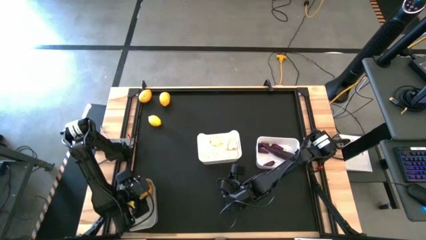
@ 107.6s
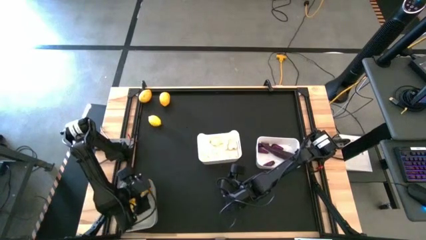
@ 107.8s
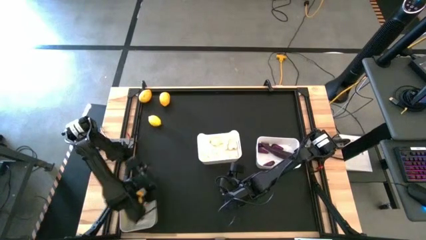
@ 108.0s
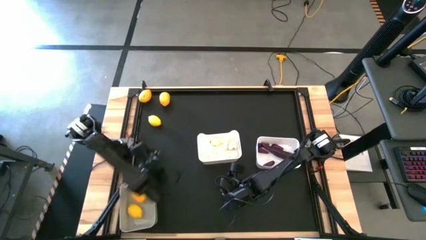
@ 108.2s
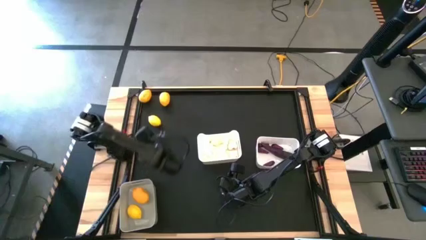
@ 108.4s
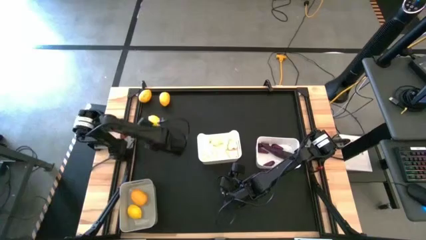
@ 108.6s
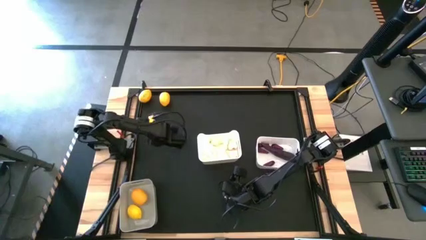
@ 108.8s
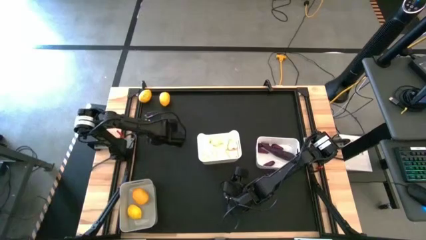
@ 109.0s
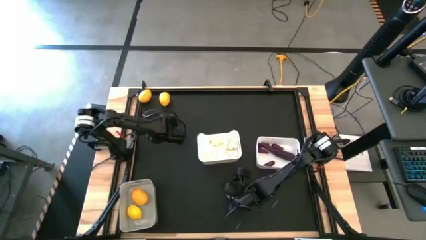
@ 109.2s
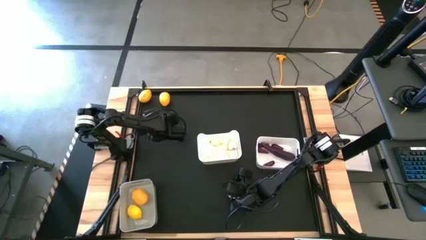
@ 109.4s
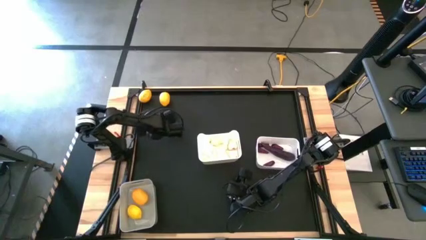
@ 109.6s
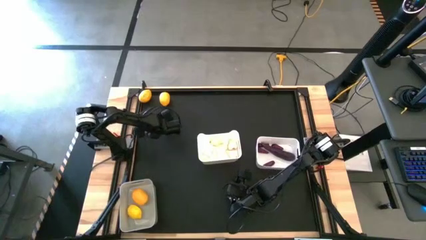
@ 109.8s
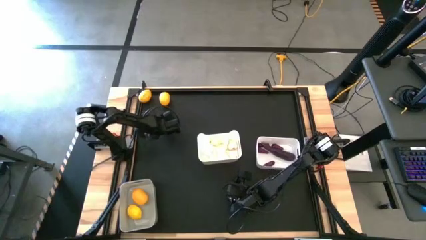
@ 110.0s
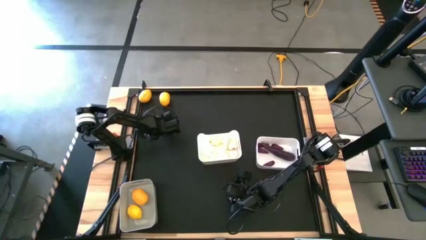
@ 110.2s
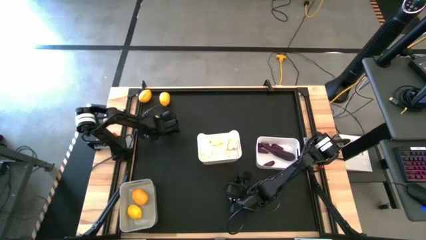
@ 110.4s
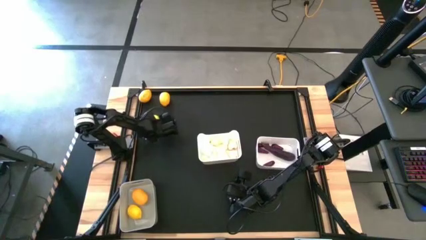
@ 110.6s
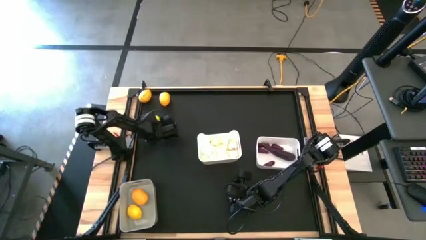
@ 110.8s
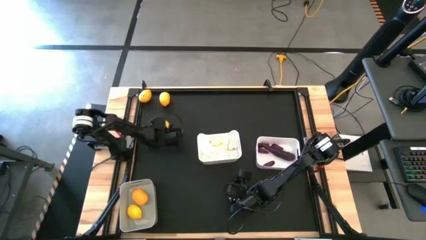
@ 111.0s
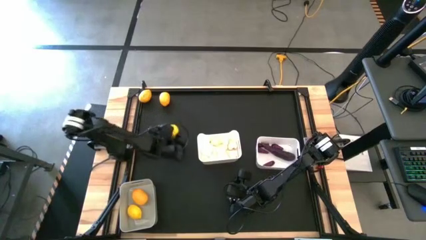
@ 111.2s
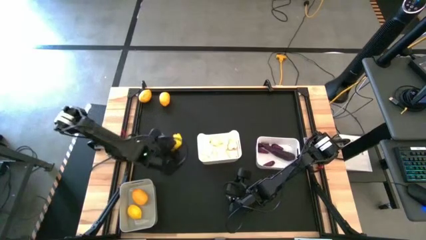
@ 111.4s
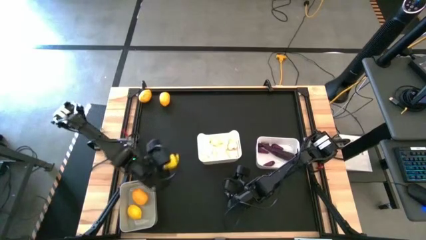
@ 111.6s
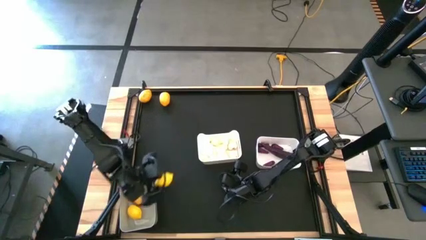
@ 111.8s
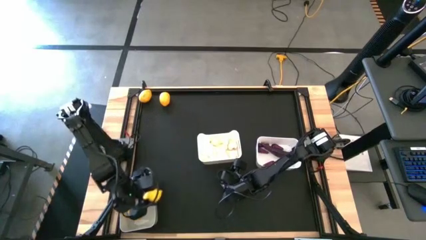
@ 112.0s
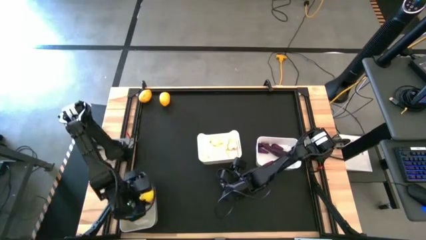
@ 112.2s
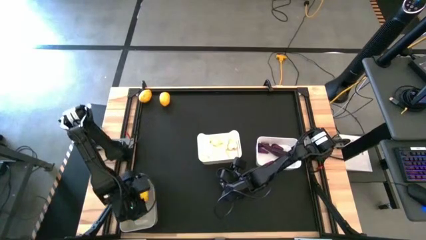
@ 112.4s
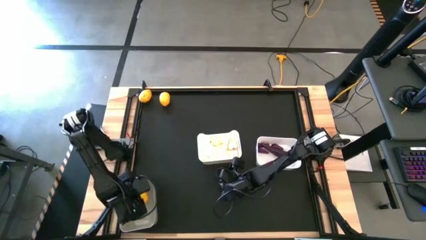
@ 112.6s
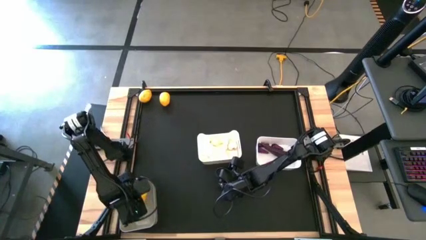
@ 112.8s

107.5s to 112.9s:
Task: Sort produce into baskets
Put the lemon into the gray bin

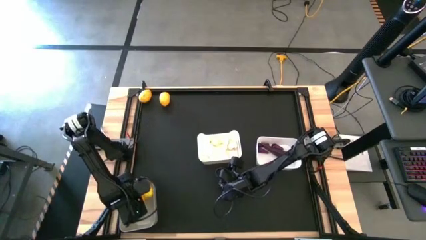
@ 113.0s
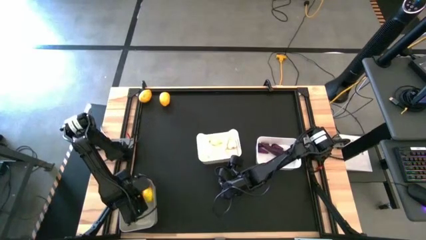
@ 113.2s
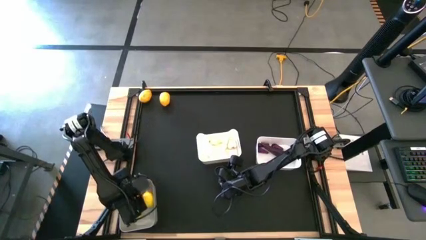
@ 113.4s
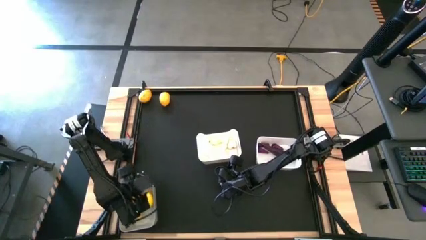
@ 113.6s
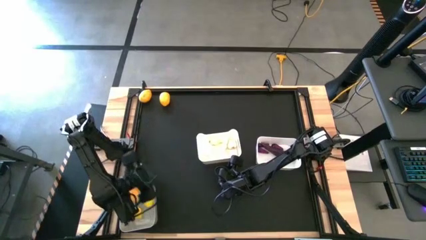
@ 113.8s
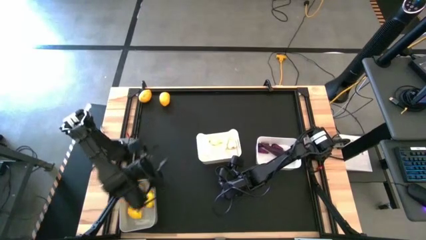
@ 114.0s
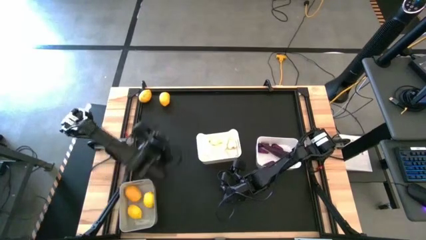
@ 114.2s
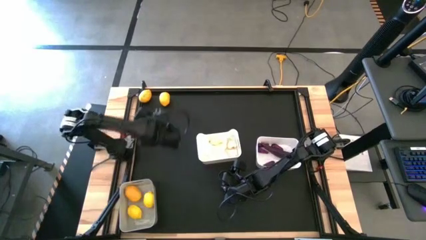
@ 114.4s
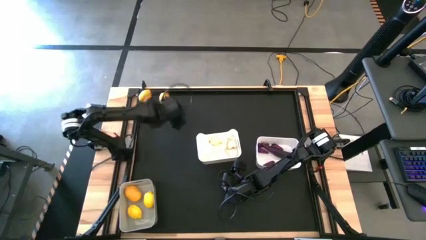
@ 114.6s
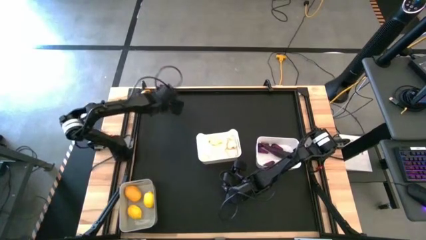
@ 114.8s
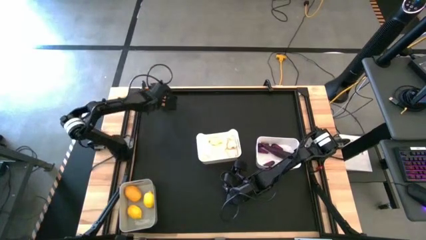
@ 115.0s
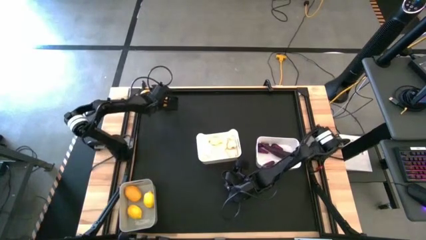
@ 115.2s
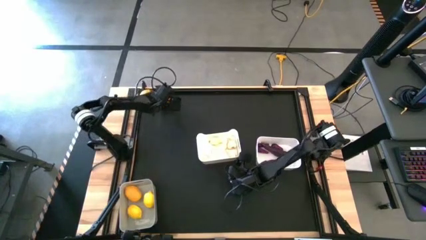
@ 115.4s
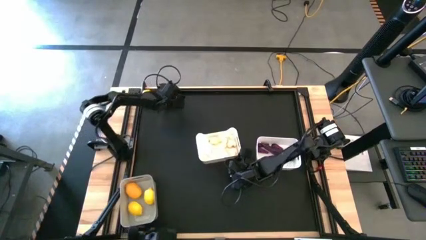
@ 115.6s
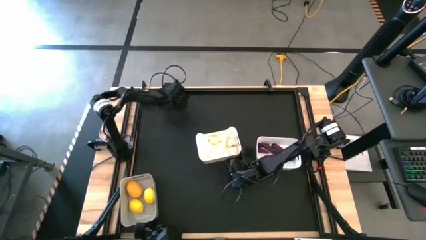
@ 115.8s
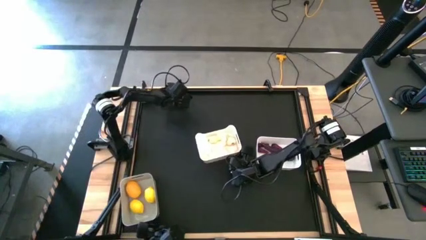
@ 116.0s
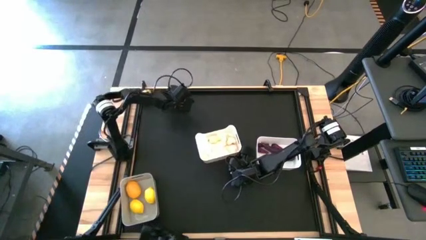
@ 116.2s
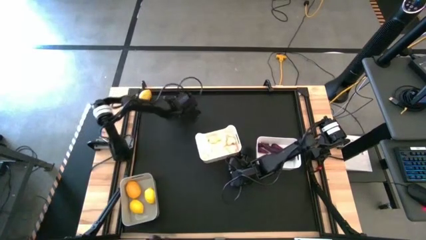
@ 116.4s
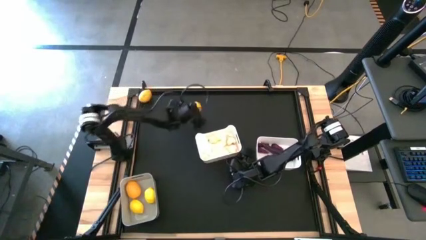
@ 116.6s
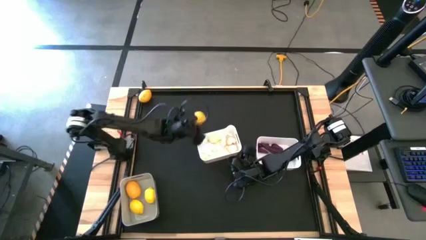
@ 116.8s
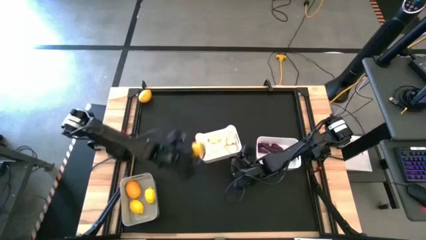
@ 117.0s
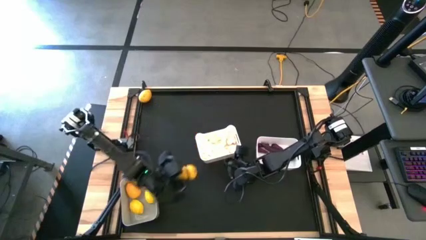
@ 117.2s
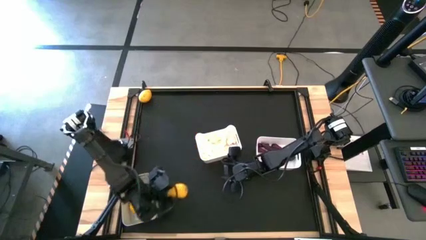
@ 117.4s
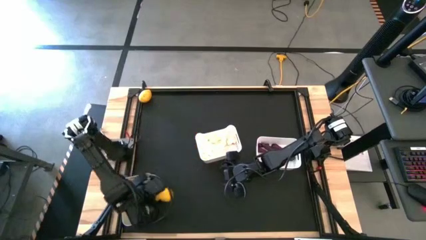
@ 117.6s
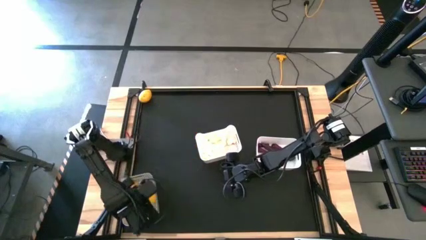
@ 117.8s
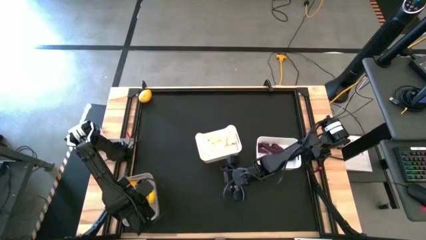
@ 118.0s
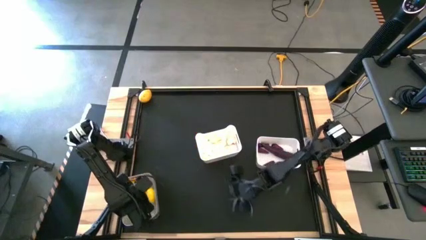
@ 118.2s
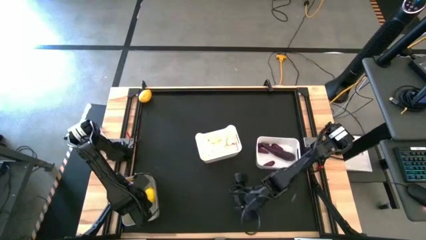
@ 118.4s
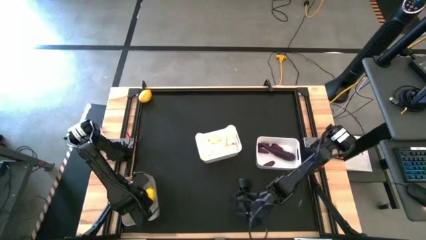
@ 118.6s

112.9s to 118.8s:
Put the lemon into the gray bin

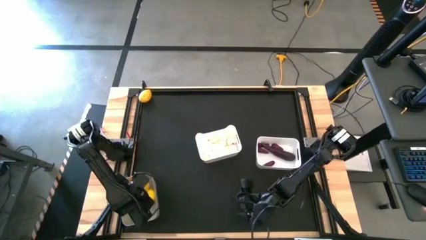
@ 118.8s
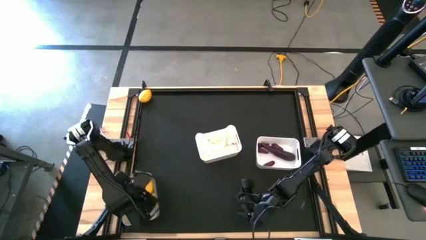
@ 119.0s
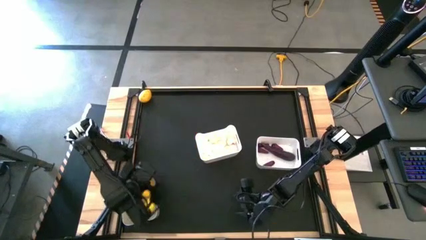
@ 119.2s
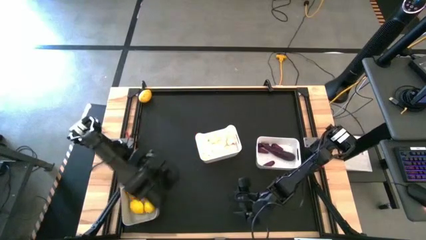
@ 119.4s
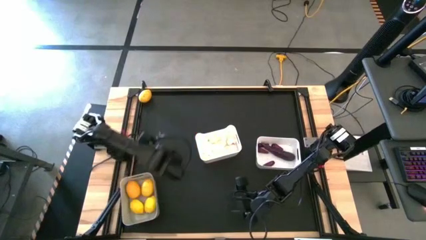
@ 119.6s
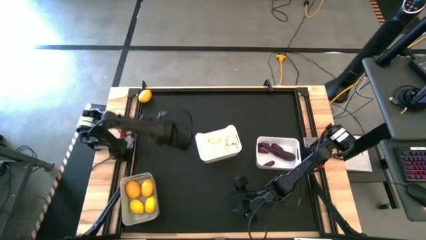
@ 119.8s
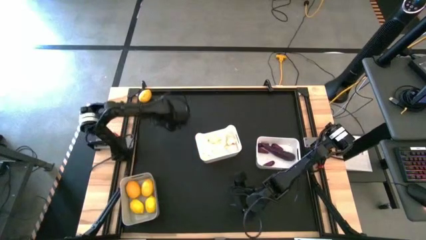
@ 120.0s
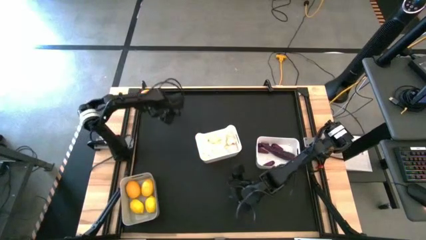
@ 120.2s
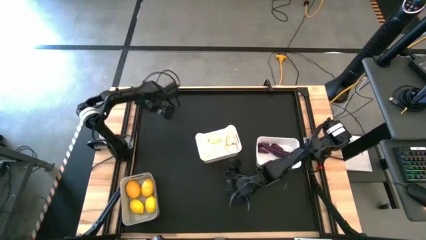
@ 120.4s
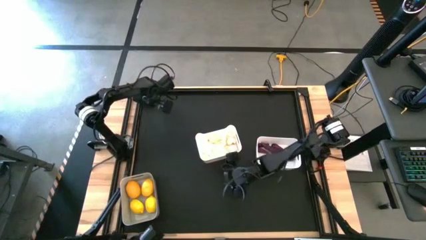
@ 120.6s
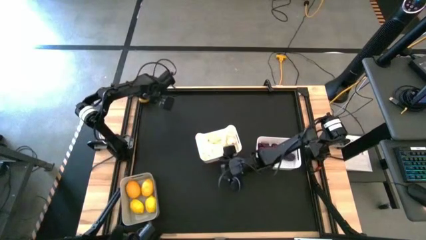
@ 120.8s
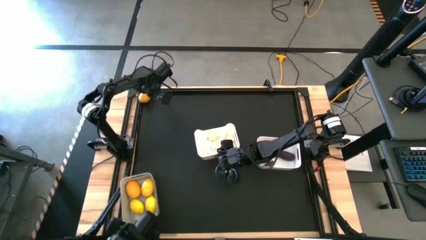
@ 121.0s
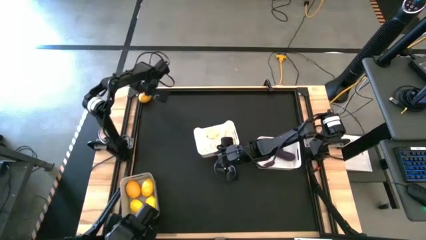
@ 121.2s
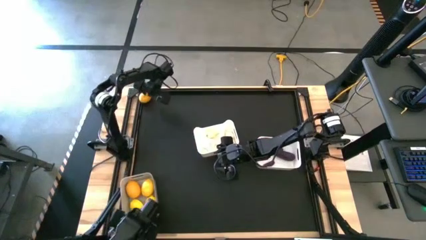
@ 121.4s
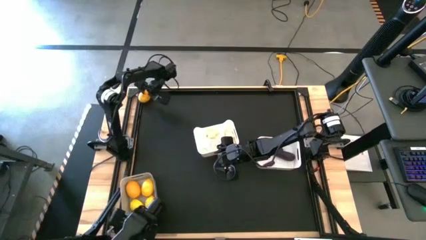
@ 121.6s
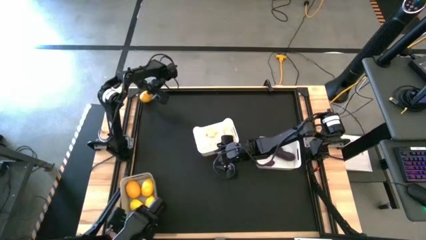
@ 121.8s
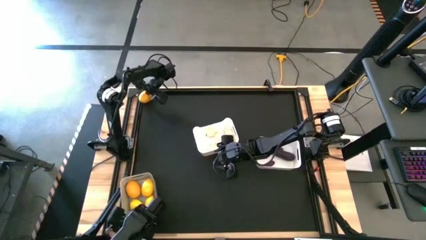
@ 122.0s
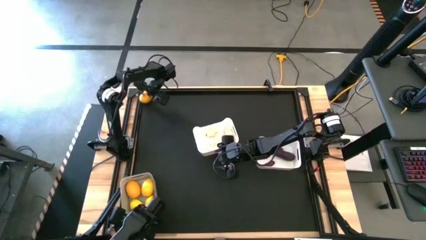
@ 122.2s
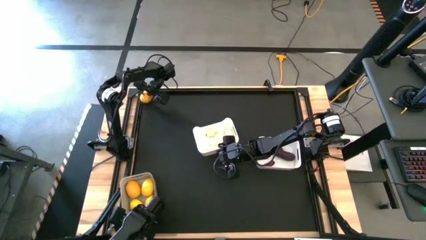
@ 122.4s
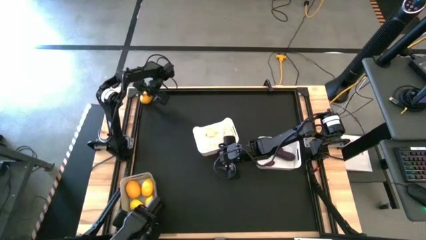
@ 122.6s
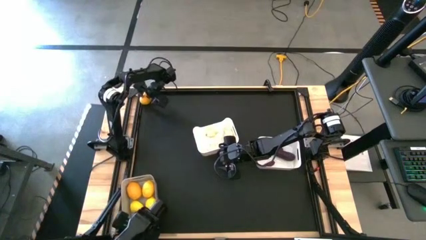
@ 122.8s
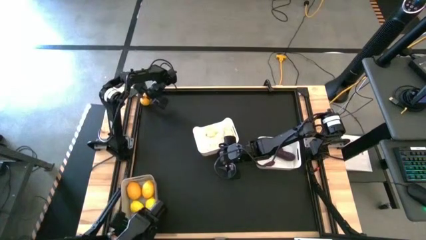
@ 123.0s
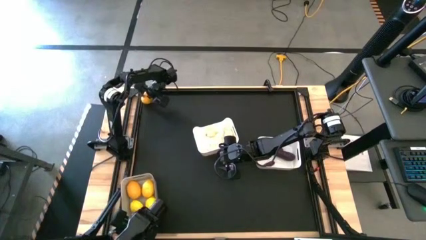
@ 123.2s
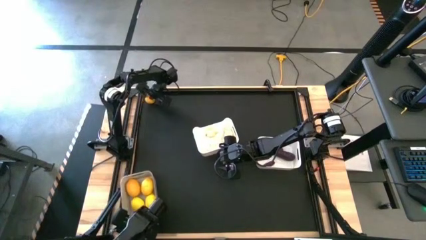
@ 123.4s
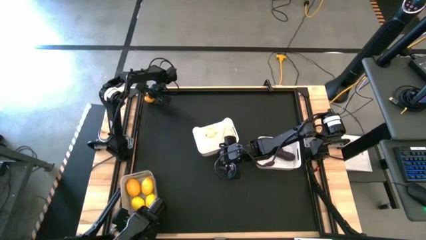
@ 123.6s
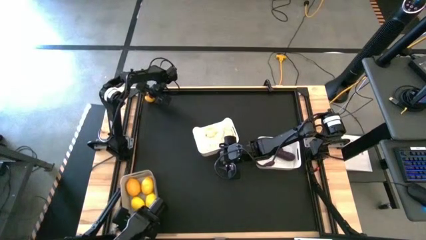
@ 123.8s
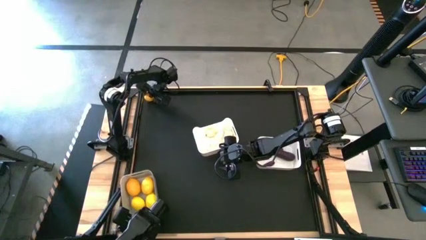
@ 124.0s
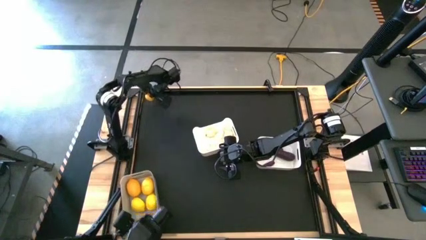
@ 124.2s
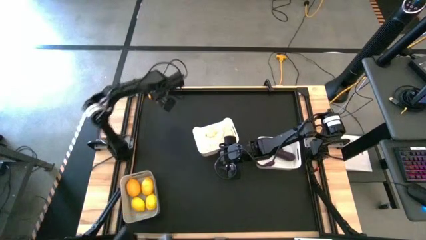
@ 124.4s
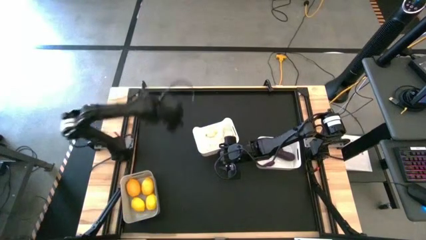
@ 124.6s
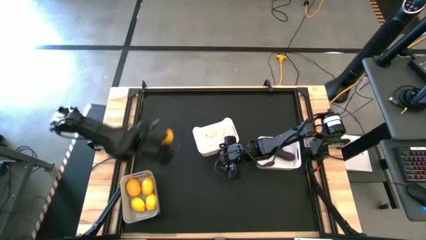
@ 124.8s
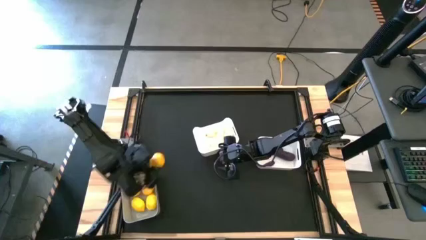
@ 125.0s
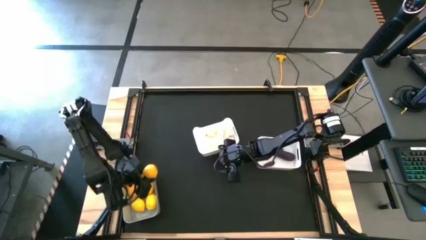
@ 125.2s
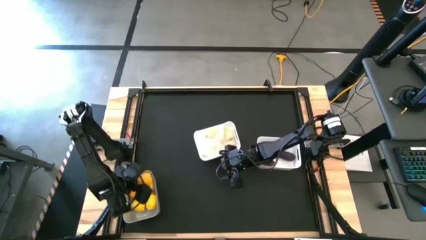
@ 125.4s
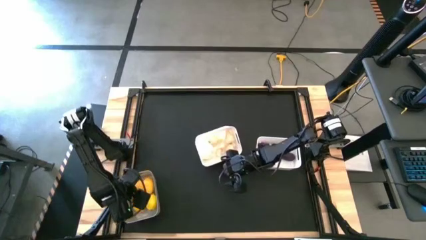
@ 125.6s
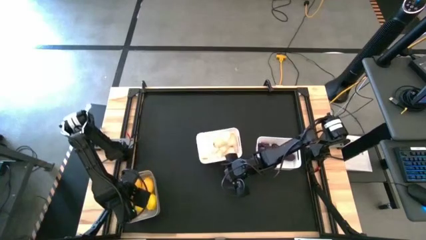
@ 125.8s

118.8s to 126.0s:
Put the lemon into the gray bin
